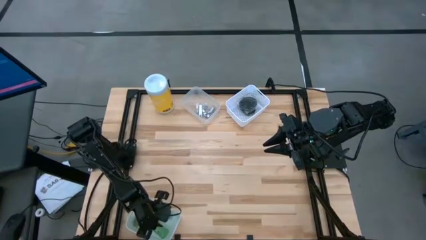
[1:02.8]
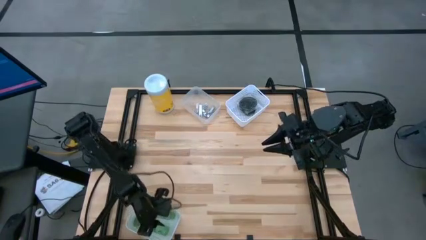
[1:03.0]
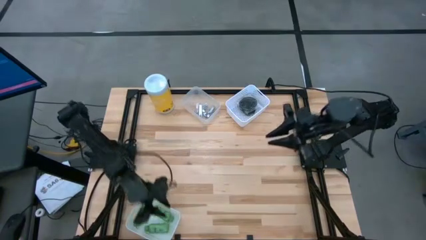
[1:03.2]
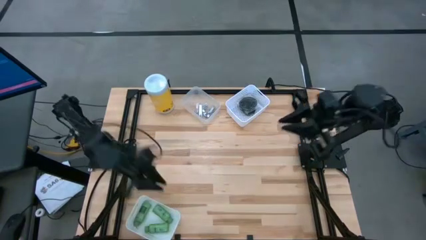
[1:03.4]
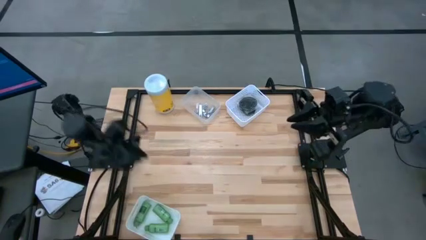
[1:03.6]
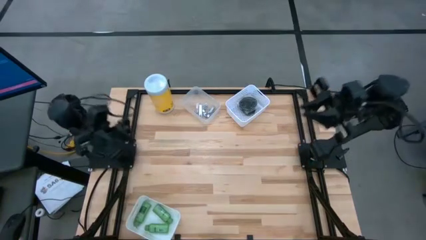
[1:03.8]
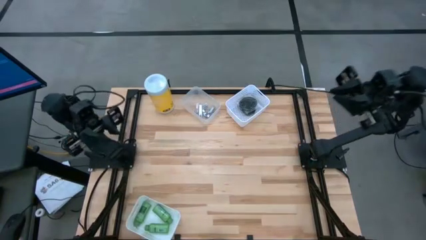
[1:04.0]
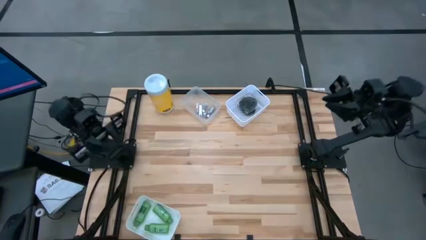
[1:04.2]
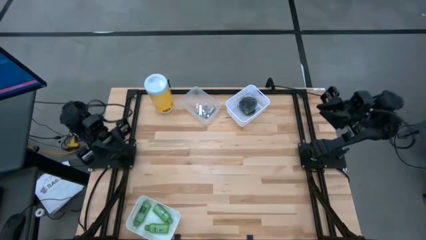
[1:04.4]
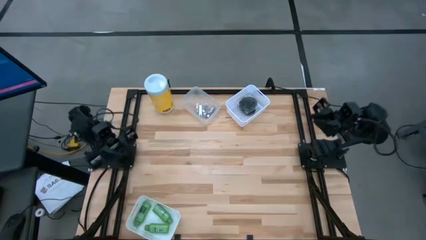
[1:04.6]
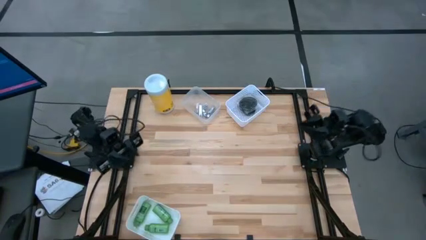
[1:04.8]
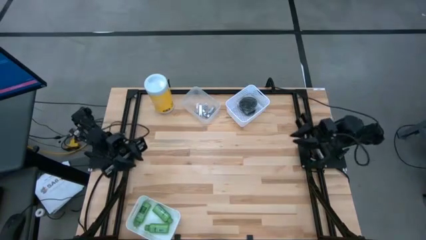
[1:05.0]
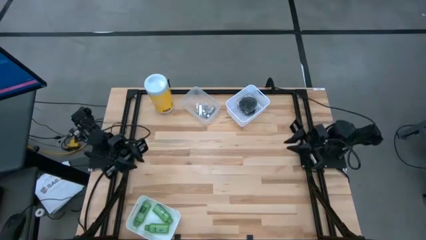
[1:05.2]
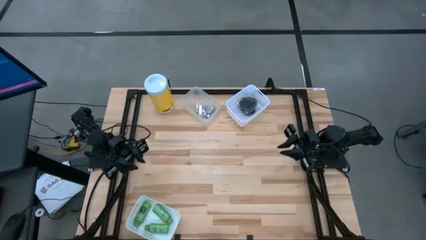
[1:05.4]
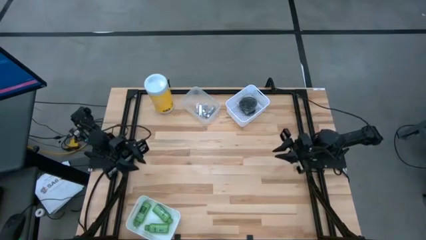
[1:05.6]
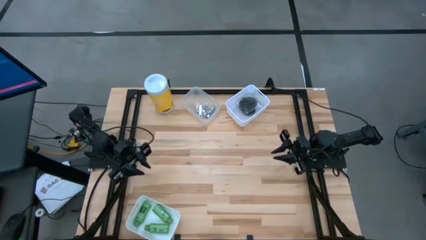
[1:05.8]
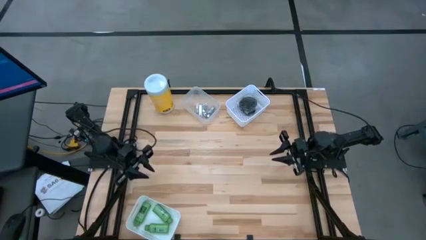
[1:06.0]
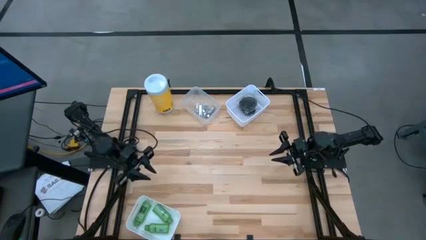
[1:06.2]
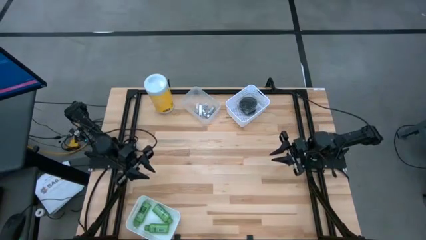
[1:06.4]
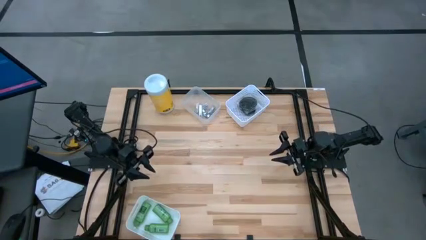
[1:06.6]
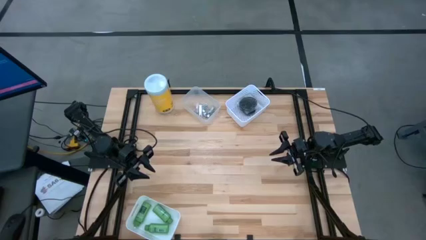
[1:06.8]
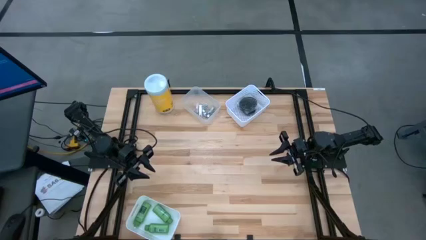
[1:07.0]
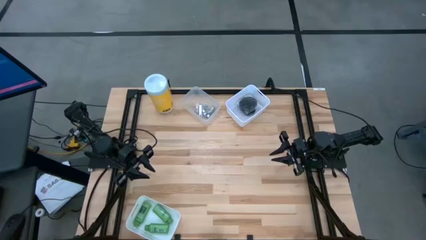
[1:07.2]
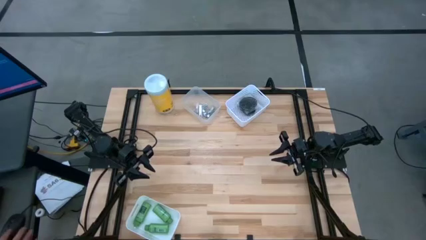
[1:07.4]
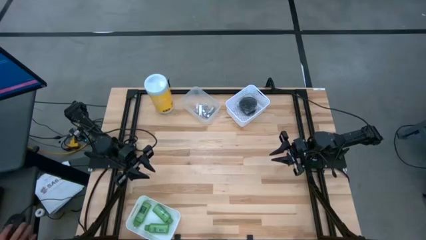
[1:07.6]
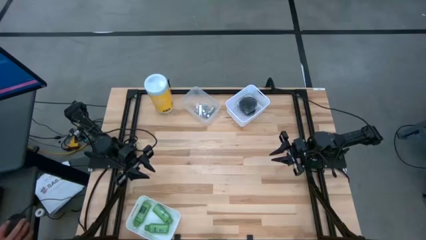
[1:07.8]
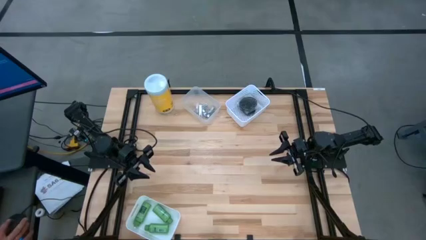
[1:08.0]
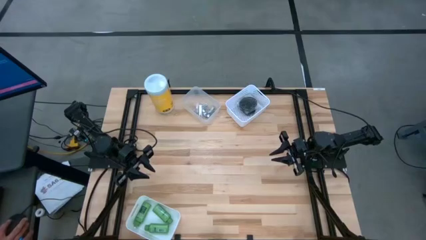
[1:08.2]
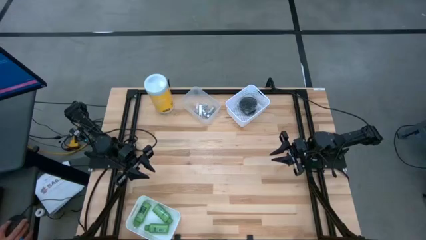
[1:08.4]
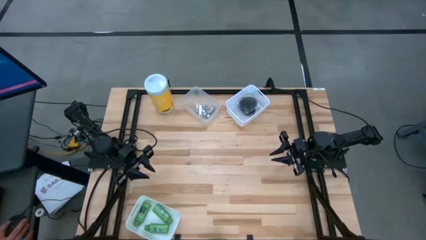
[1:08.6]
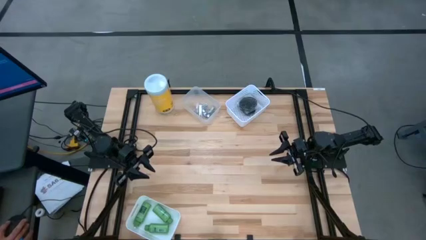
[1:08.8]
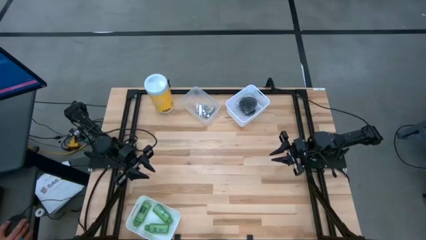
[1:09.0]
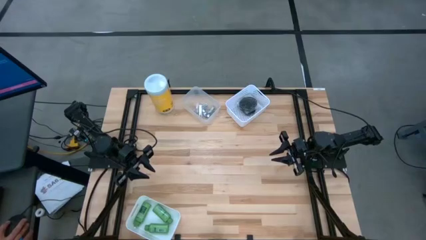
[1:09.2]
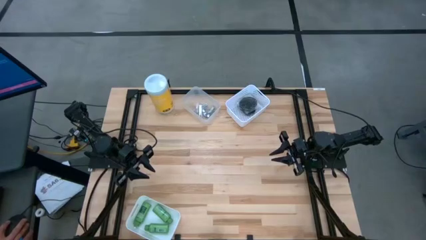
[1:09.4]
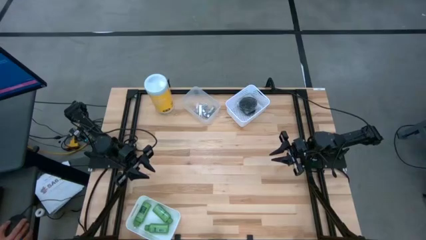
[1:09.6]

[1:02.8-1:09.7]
Task: Pick & Place Travel size toiletries
Return to Home Position

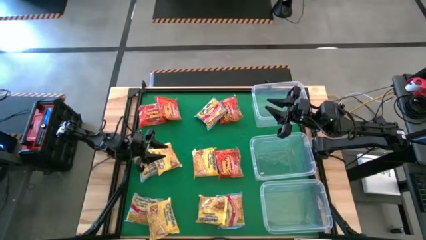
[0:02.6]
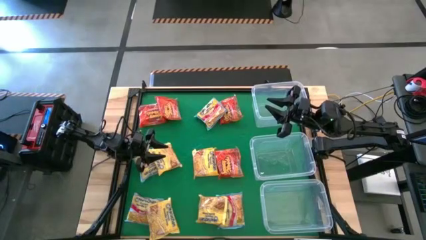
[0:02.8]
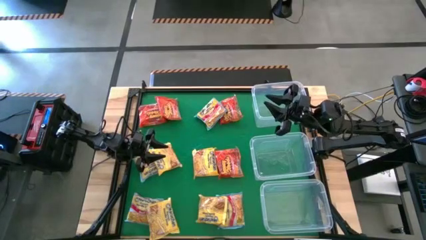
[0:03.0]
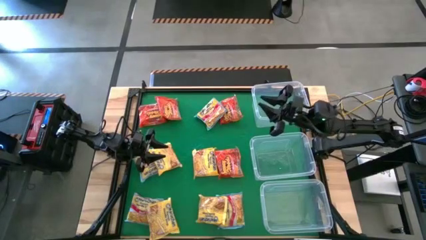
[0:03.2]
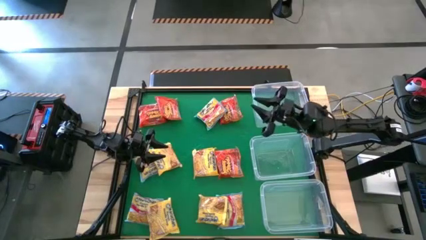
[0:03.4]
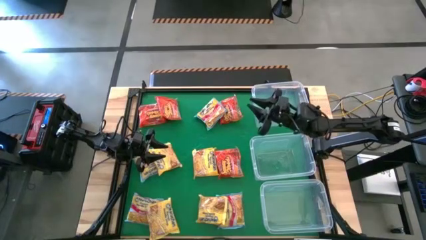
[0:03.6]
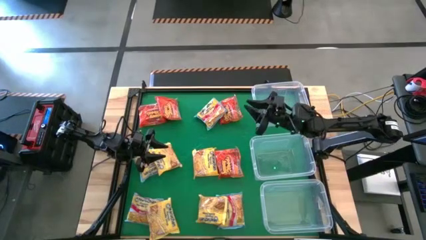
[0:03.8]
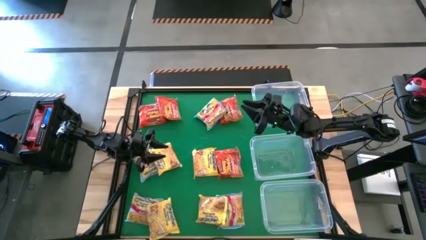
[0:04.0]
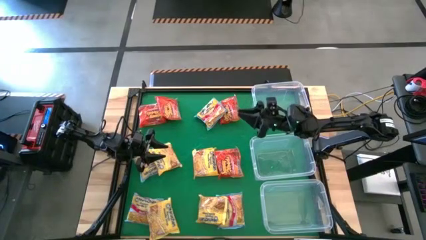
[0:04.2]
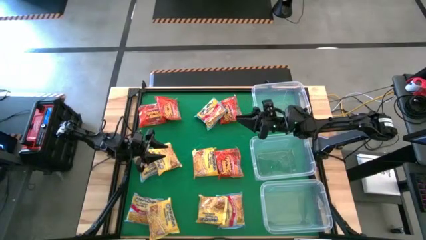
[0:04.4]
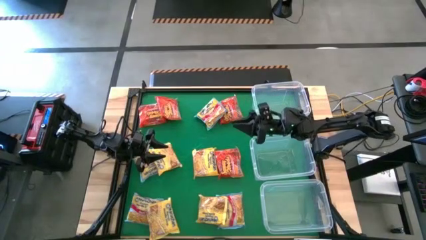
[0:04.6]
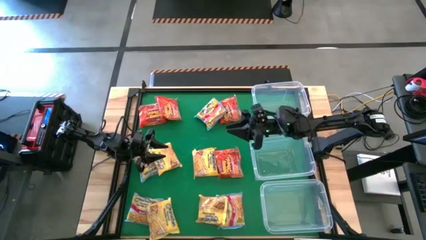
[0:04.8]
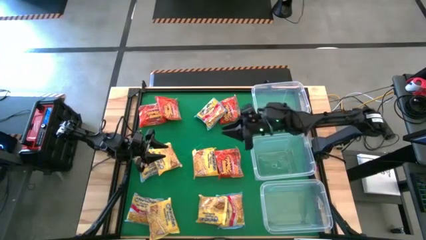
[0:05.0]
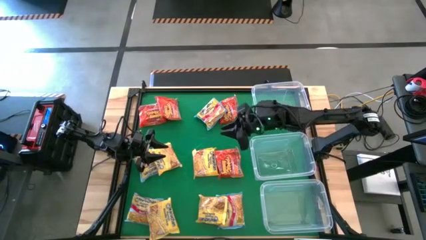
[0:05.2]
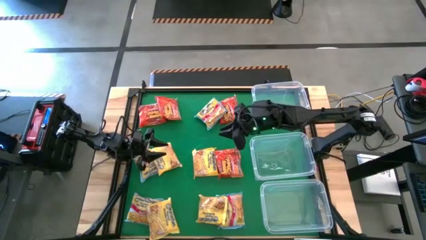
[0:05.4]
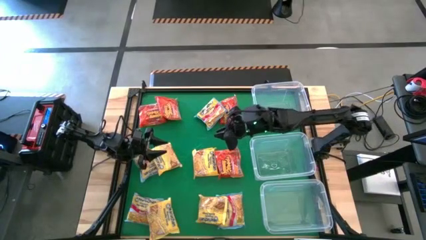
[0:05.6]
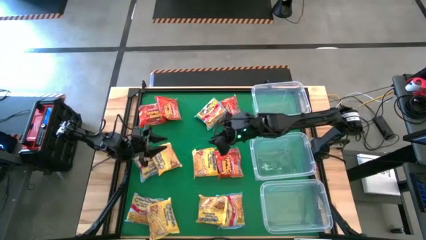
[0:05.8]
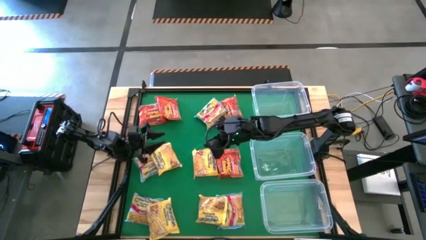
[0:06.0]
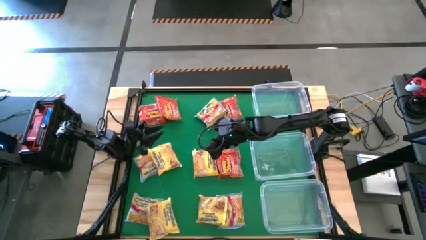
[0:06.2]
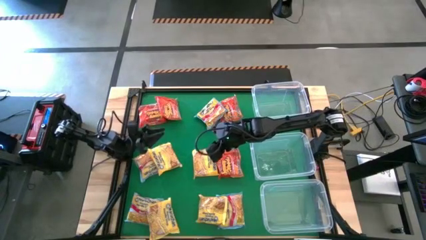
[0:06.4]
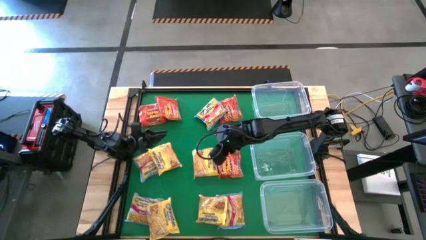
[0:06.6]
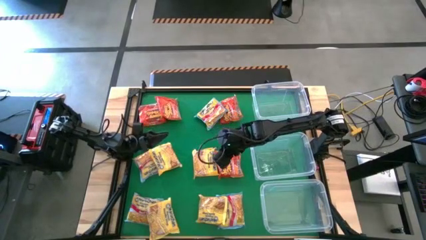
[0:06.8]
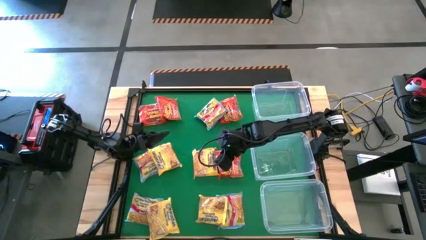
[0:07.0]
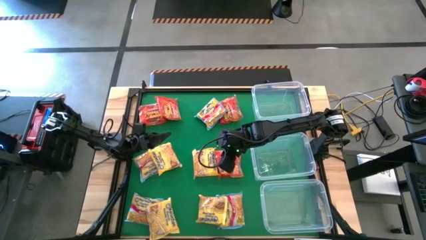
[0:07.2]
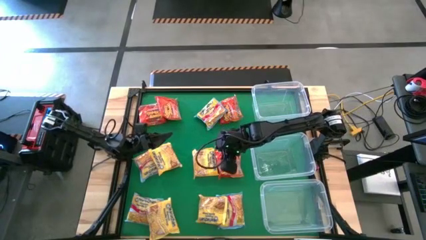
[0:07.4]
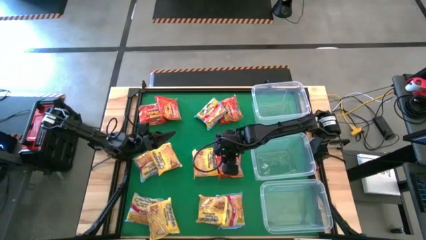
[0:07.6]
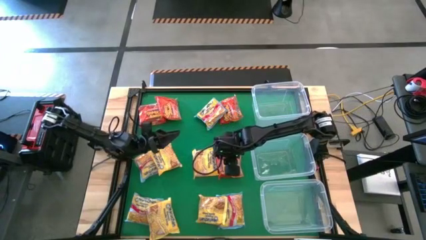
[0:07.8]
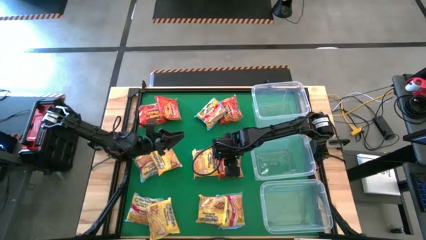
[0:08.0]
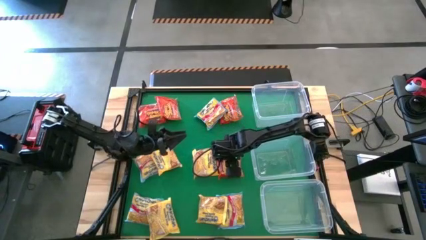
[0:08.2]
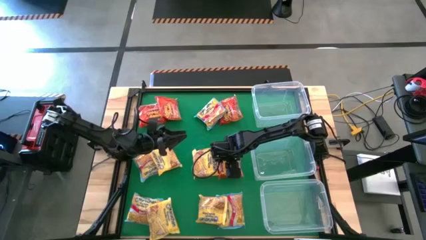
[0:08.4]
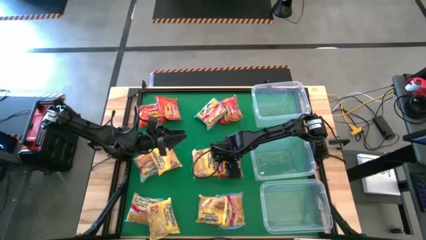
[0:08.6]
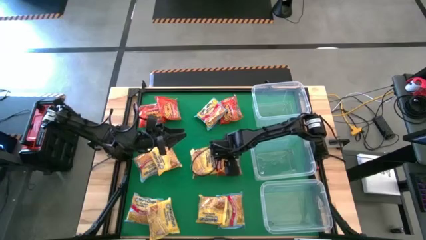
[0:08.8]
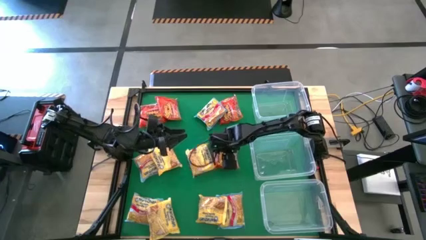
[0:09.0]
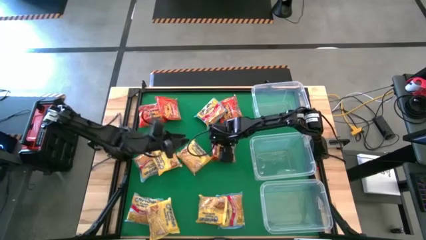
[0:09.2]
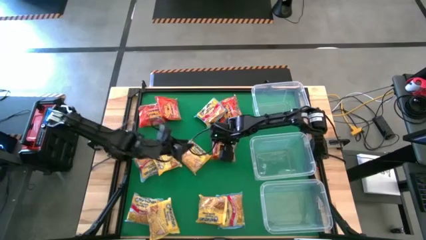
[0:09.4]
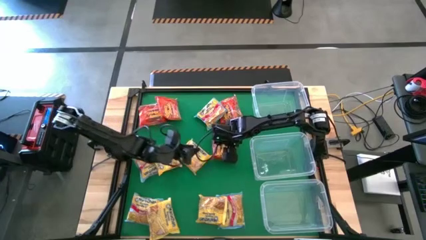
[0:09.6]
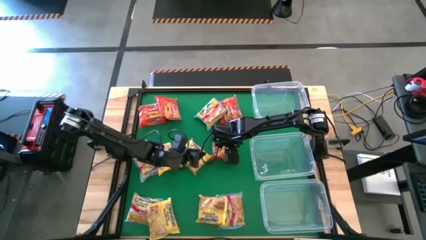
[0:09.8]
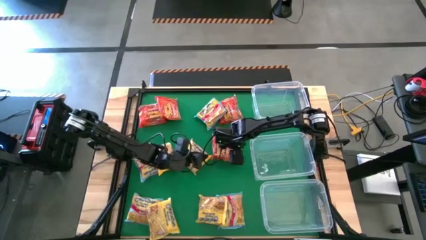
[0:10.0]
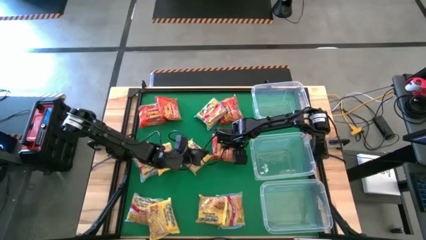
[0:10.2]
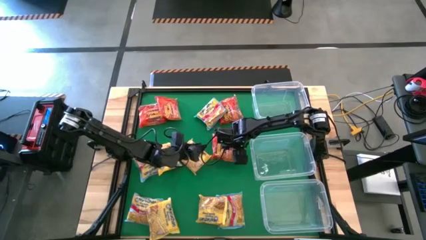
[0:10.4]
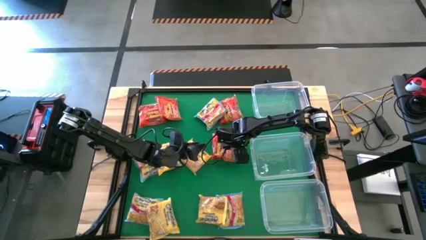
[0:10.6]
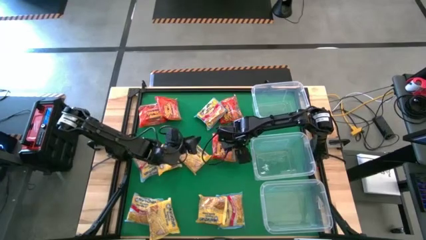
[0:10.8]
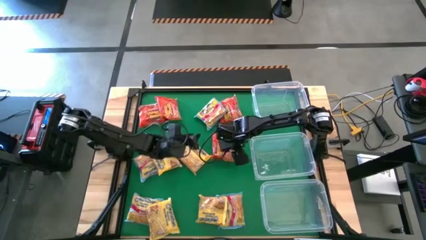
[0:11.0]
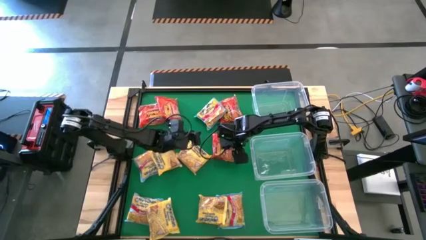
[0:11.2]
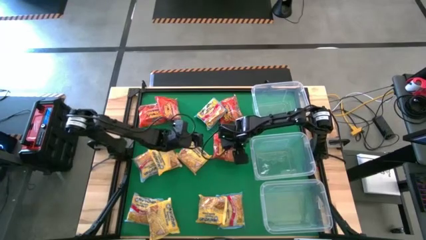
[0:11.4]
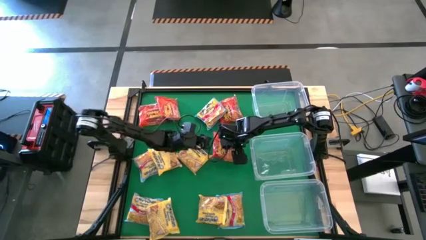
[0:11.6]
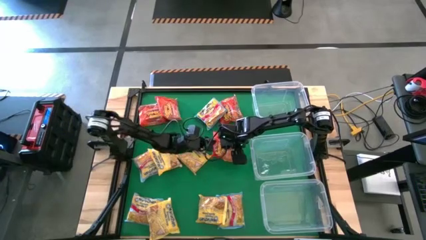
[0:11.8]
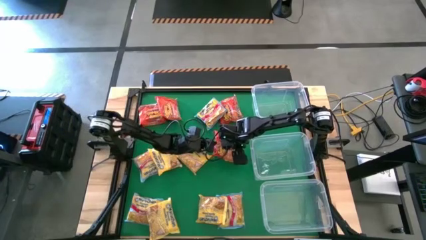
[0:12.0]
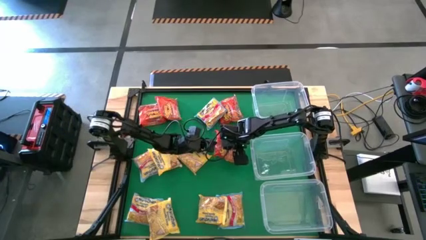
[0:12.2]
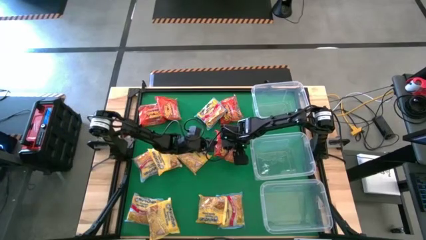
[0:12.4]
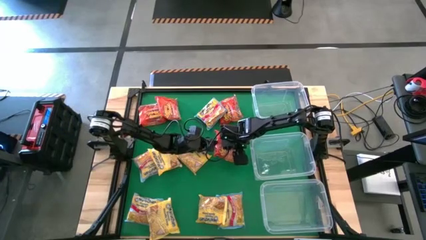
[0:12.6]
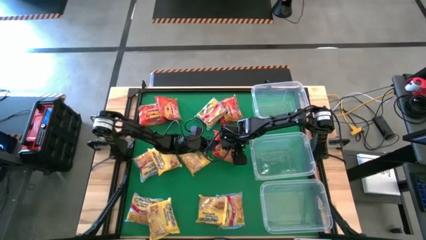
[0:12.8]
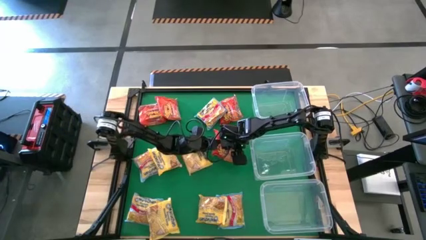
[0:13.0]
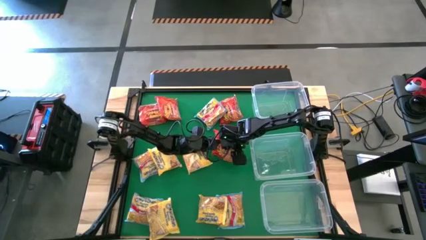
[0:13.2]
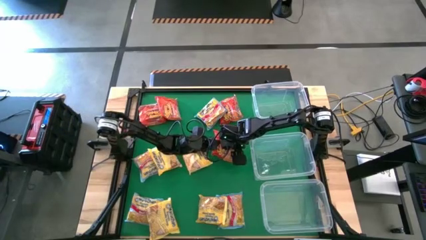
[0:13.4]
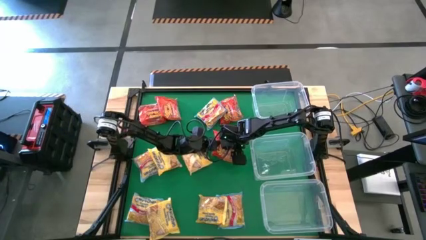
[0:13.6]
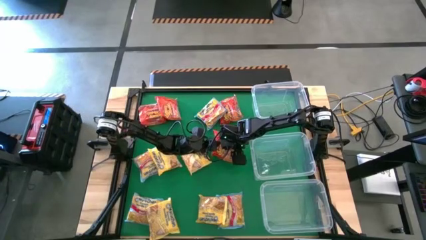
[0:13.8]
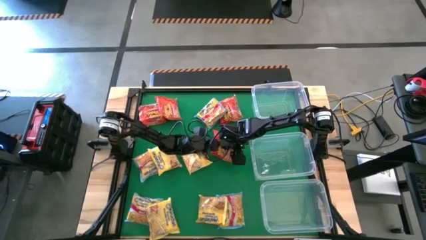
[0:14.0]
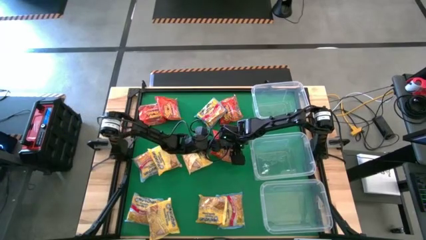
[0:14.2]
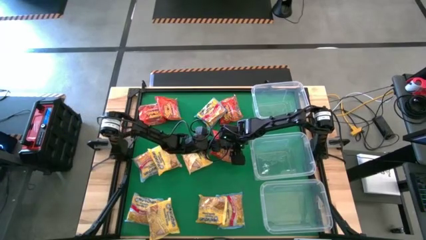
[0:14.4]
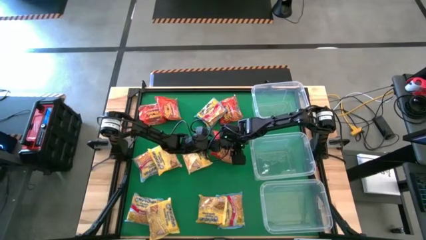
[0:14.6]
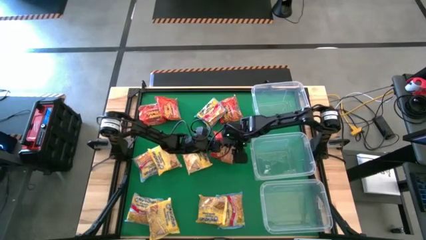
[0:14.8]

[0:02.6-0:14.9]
Task: Sort Maruchan noodles
Put the bottom red noodle pack into the top transparent bin
